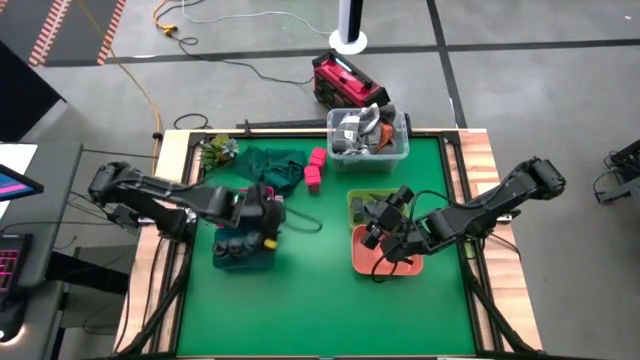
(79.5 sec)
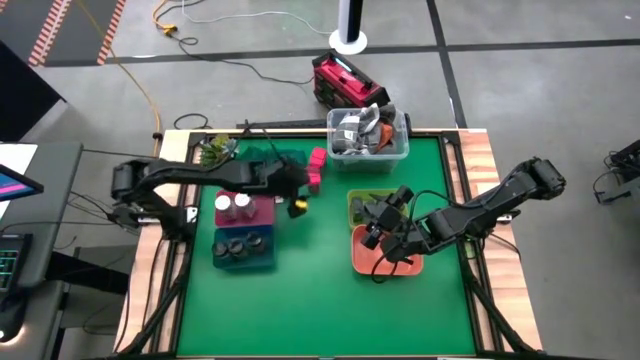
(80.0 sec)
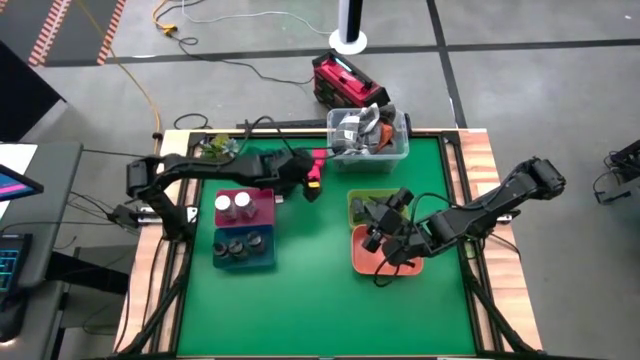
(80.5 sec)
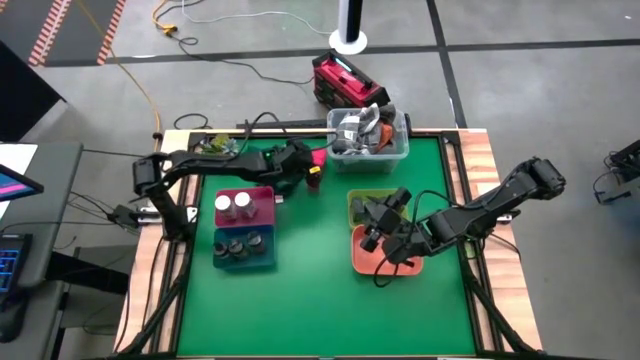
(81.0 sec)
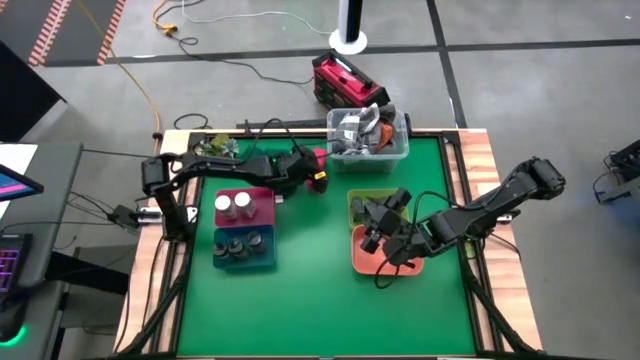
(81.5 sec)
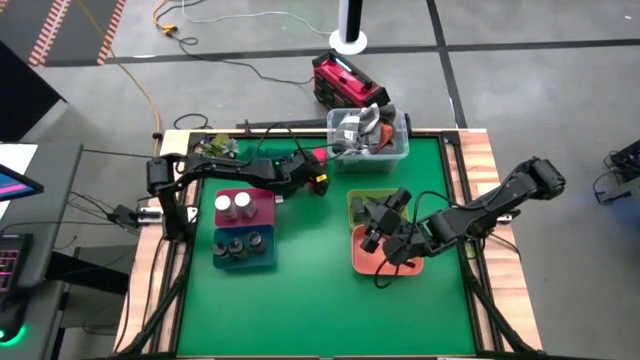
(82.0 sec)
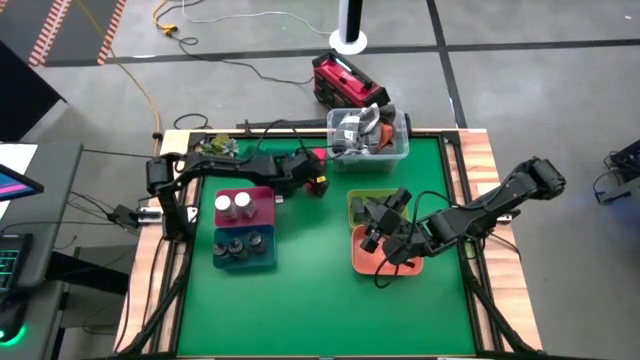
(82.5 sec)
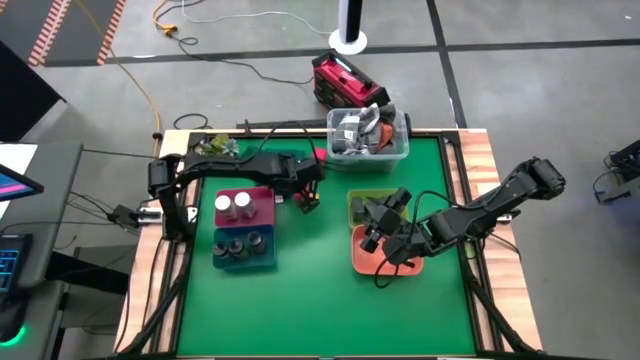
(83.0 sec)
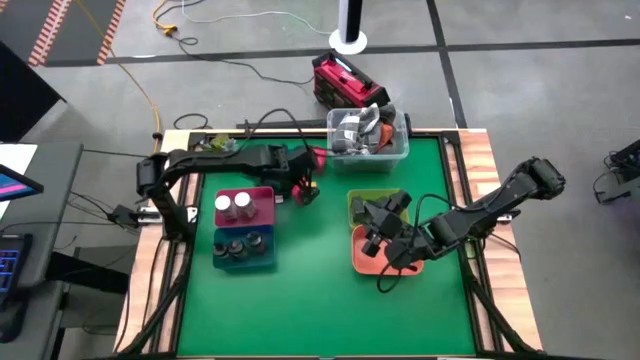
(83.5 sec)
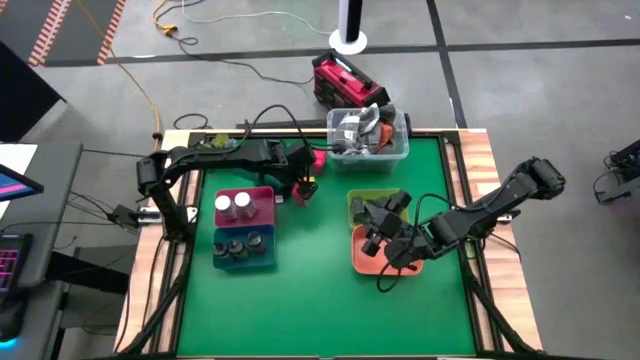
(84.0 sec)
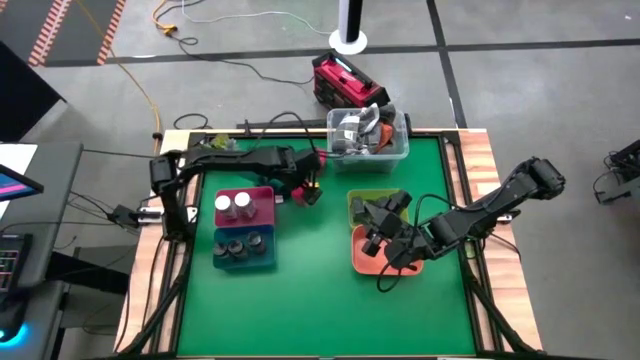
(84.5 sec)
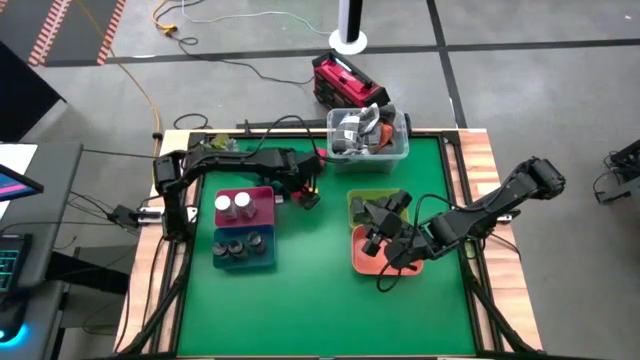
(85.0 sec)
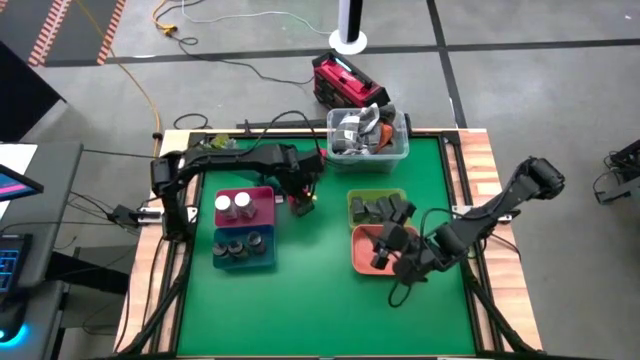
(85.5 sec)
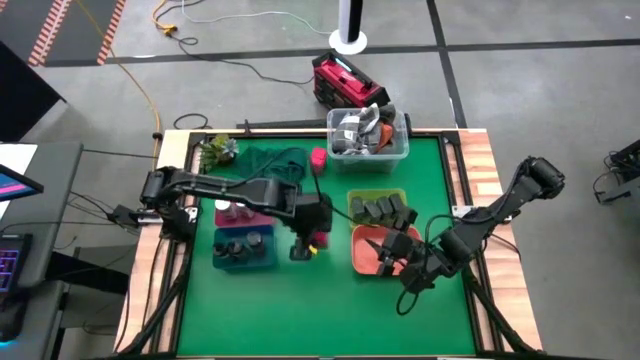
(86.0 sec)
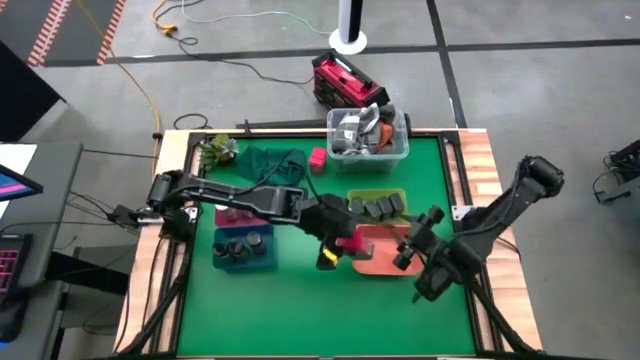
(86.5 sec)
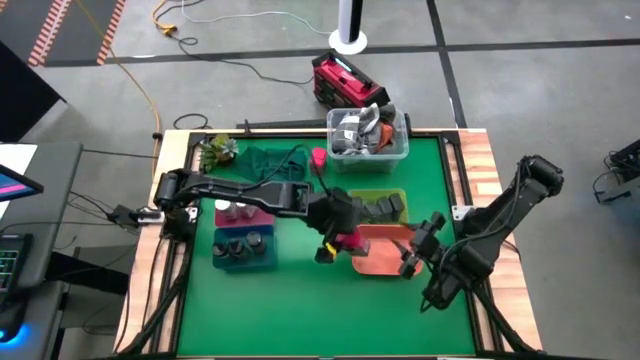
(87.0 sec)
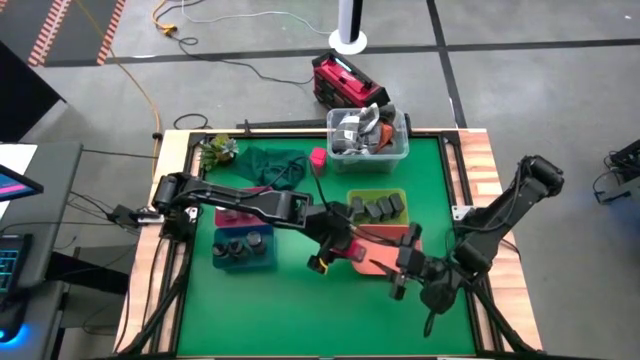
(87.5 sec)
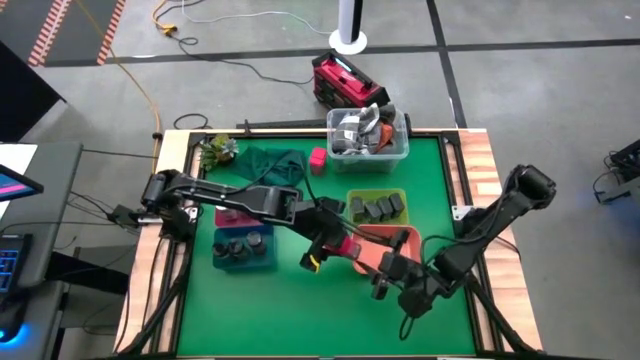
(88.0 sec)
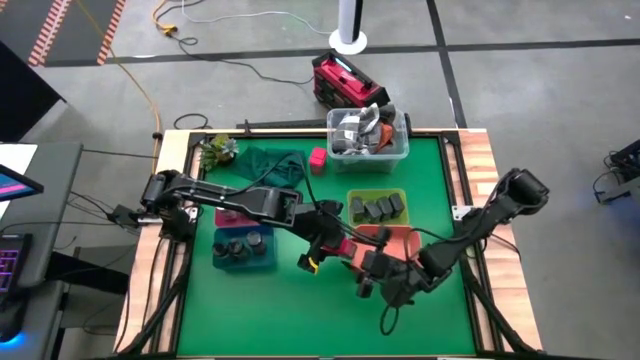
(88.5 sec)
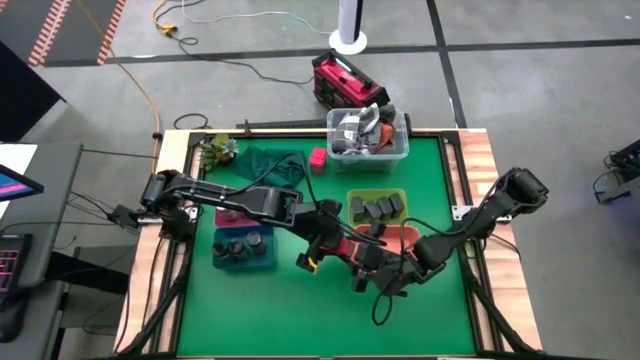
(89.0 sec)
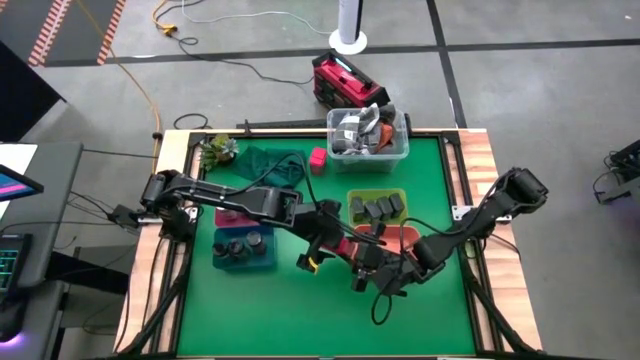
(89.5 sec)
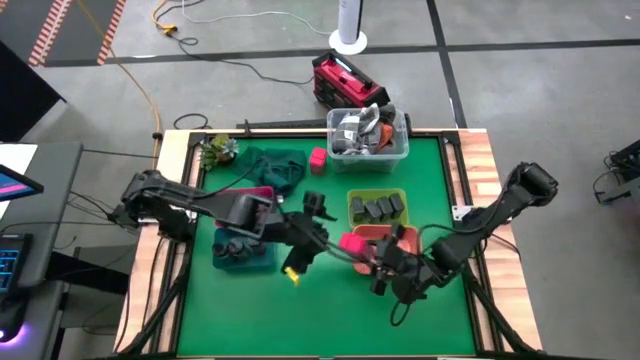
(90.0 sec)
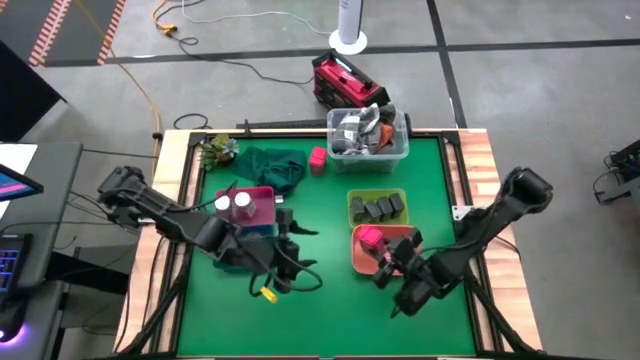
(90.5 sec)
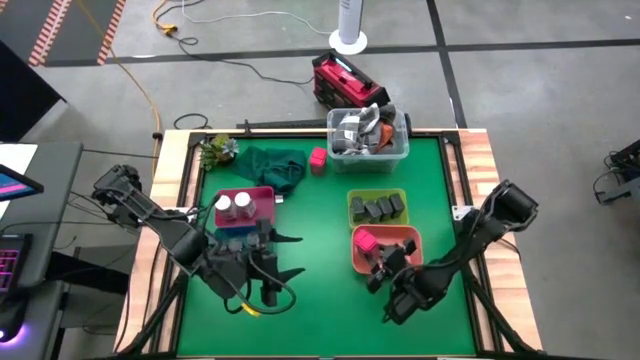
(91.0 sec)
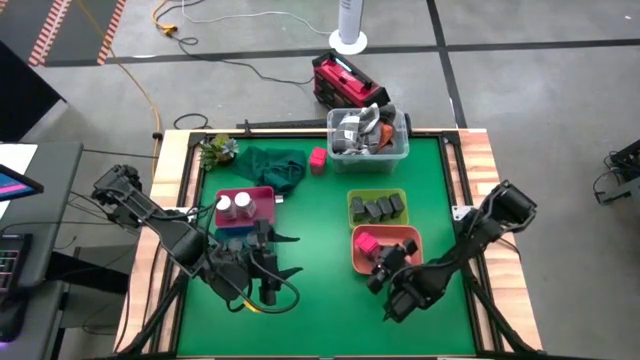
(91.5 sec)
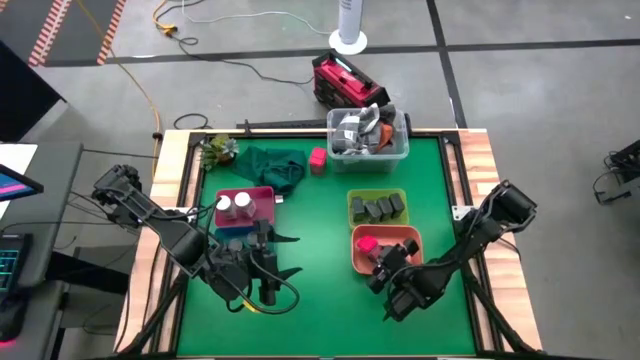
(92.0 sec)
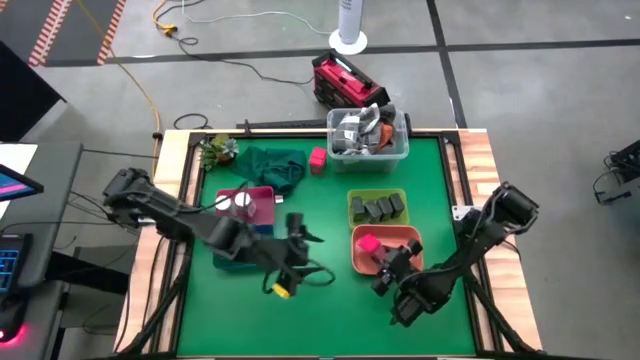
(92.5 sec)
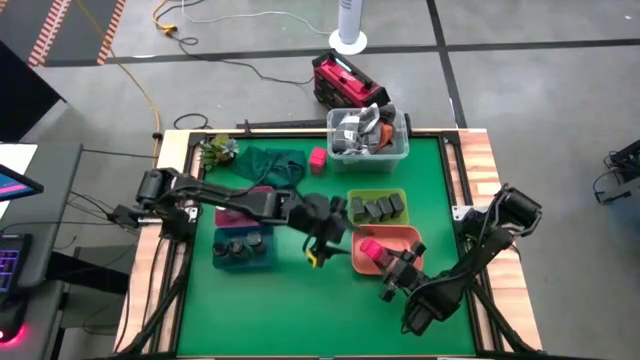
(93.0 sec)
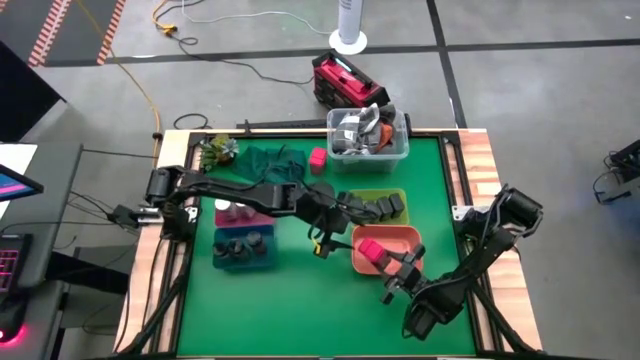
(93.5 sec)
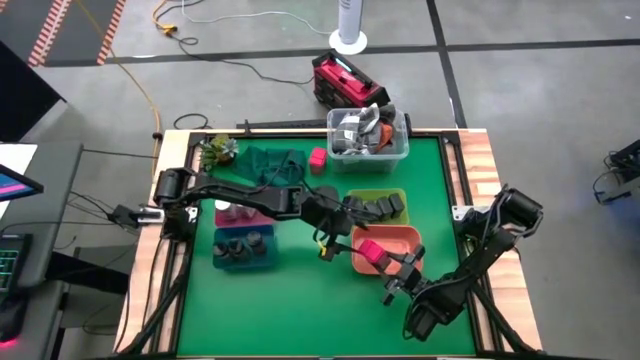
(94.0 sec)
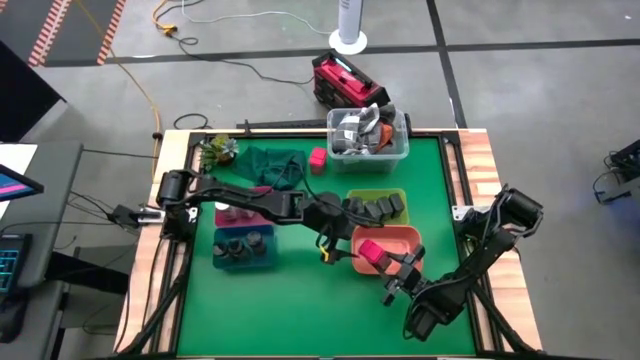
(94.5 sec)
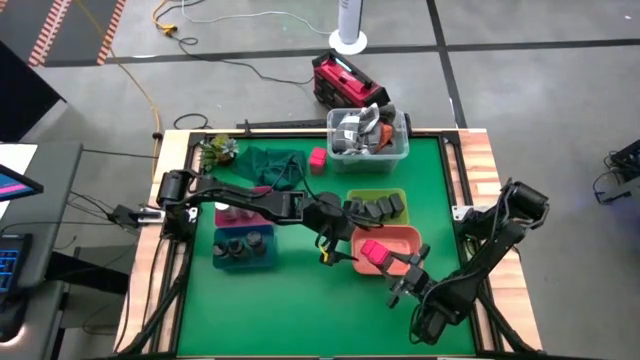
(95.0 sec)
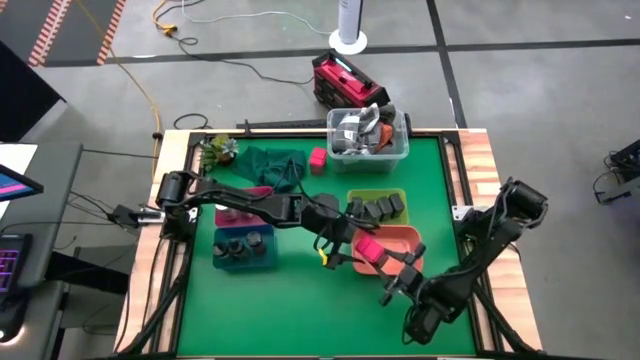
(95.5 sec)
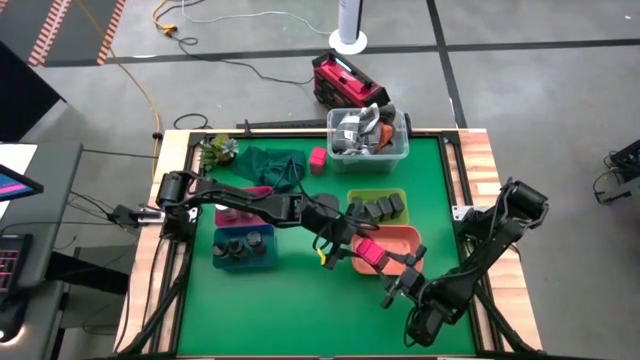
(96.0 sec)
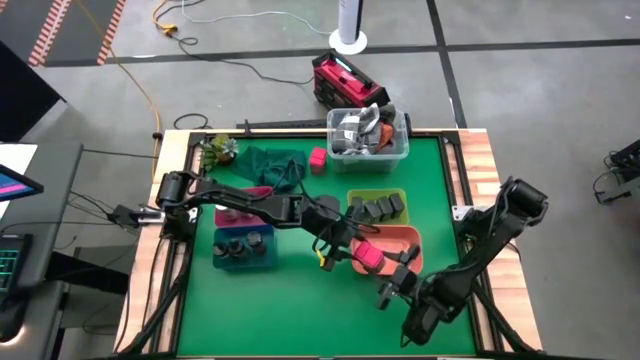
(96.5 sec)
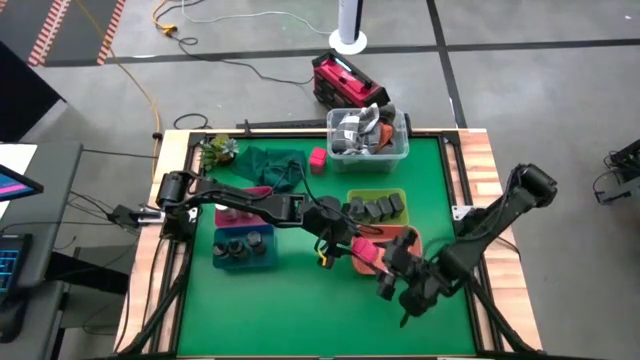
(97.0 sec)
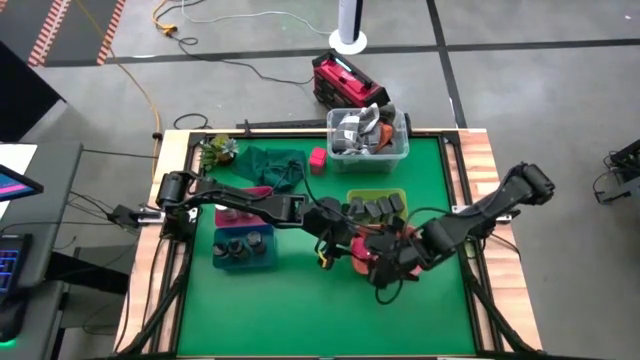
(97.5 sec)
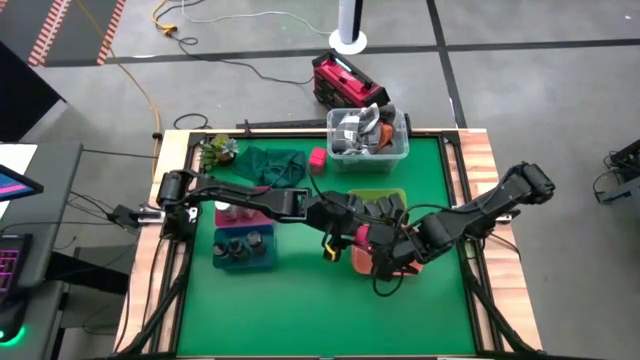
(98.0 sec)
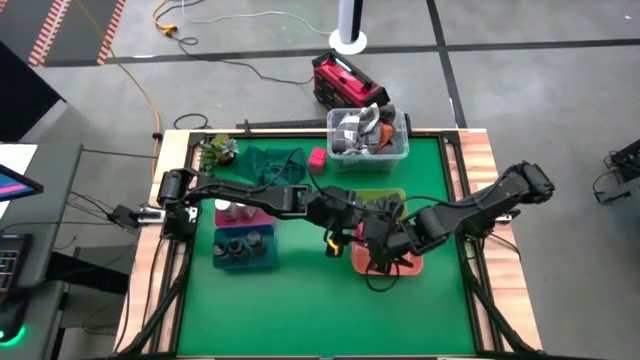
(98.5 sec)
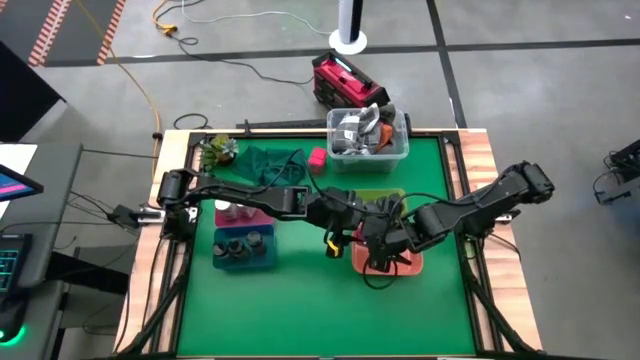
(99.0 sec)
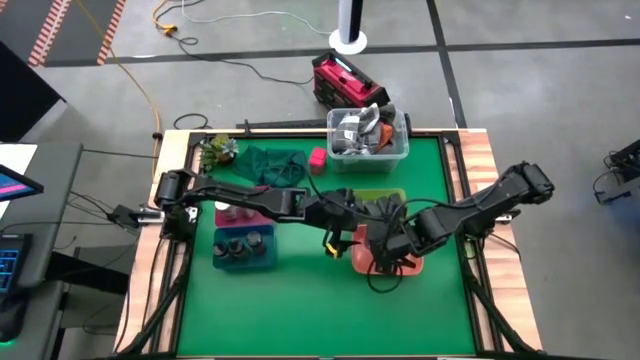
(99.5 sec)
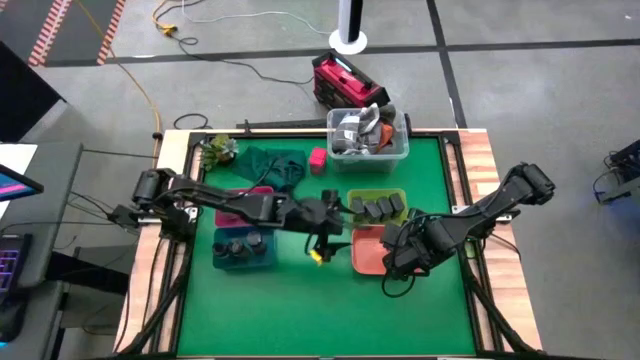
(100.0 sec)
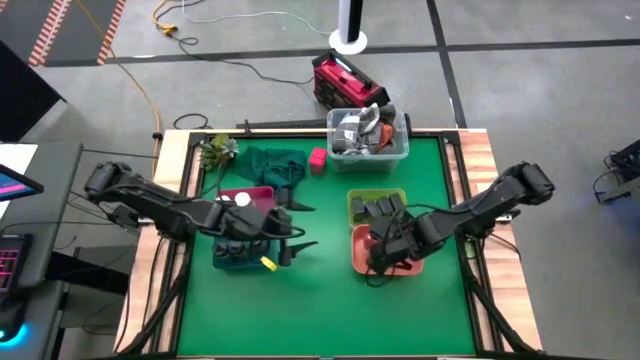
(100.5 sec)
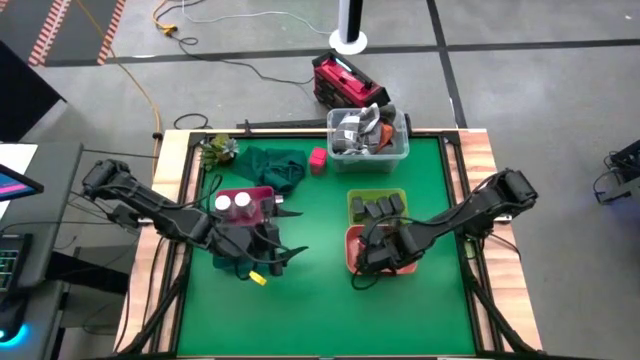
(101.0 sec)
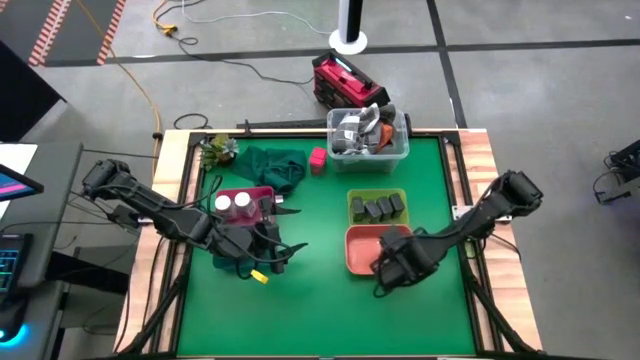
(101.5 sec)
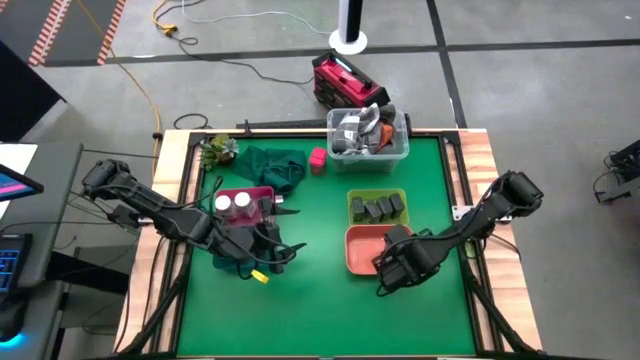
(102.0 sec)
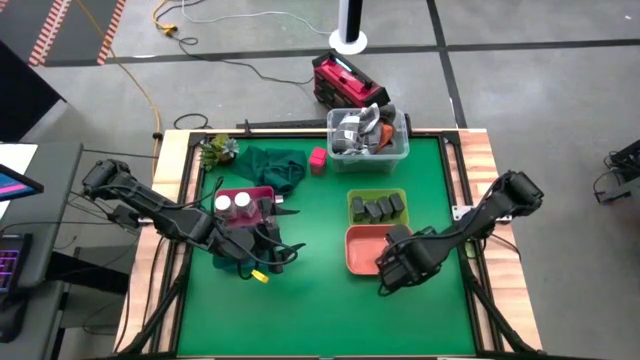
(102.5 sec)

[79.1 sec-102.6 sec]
Task: Sort spices by type
Put the red spice can into the orange bin
